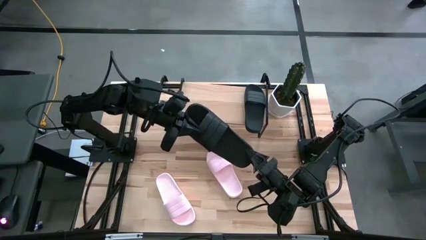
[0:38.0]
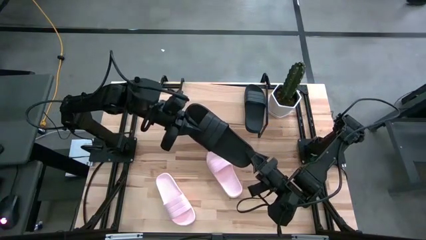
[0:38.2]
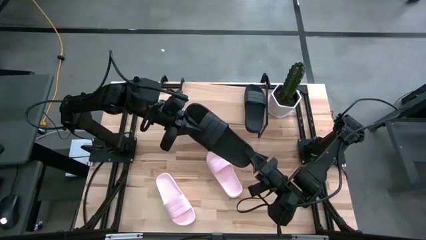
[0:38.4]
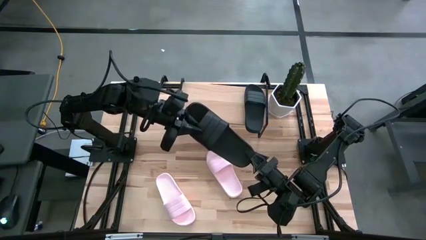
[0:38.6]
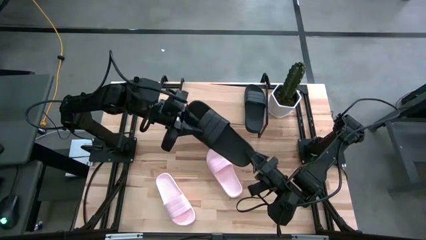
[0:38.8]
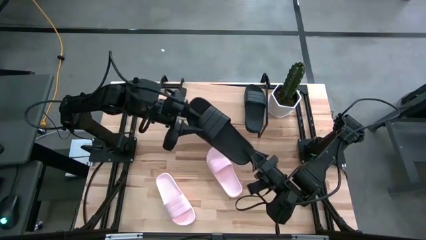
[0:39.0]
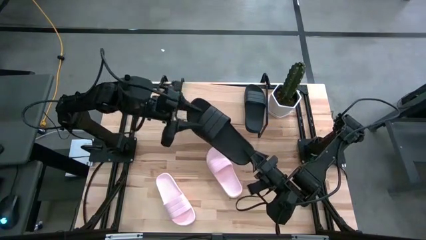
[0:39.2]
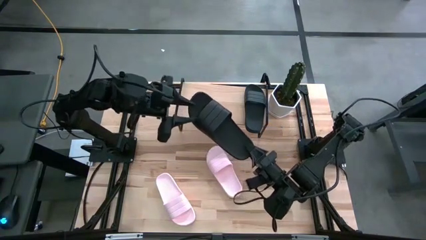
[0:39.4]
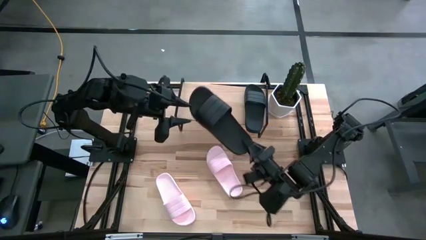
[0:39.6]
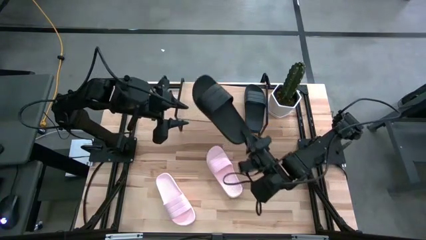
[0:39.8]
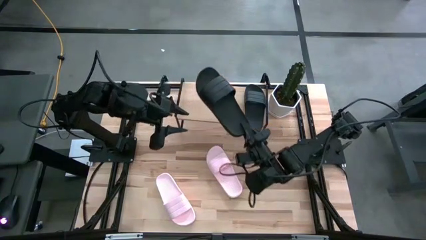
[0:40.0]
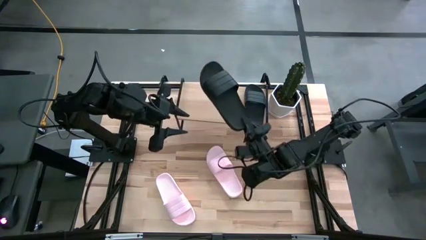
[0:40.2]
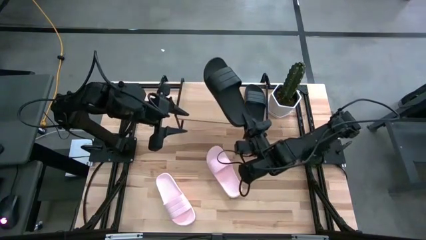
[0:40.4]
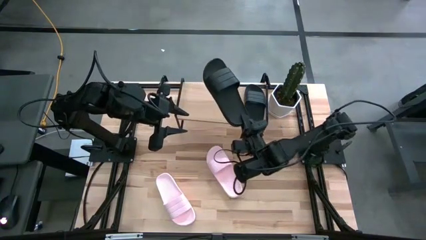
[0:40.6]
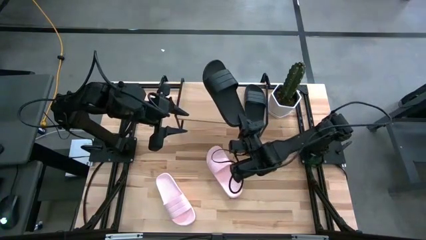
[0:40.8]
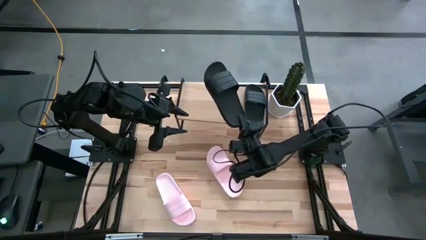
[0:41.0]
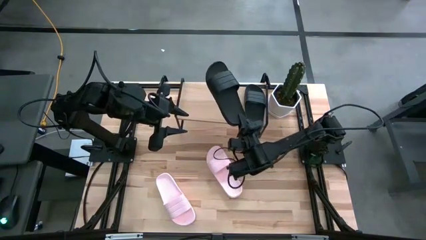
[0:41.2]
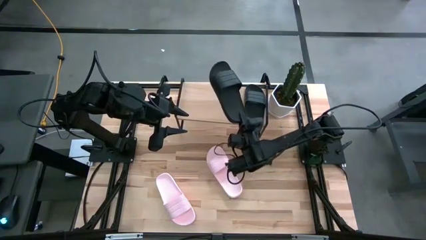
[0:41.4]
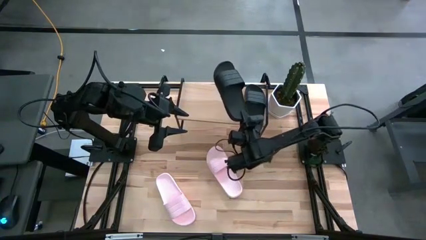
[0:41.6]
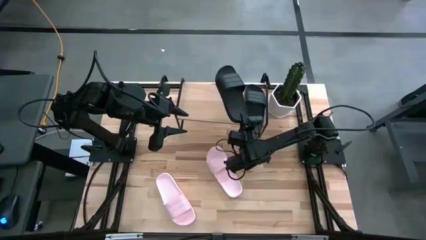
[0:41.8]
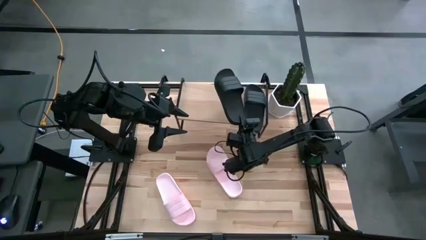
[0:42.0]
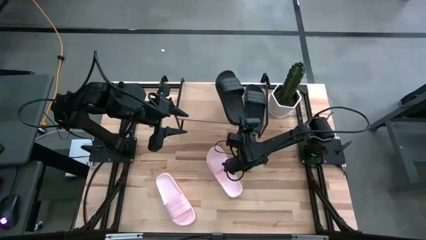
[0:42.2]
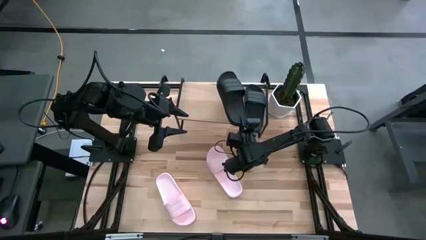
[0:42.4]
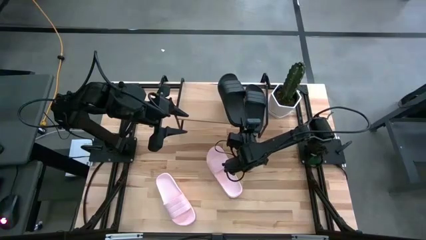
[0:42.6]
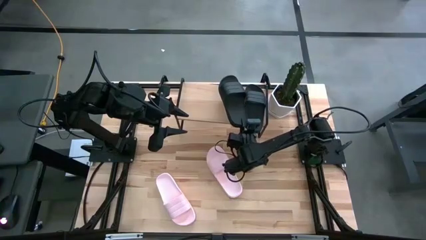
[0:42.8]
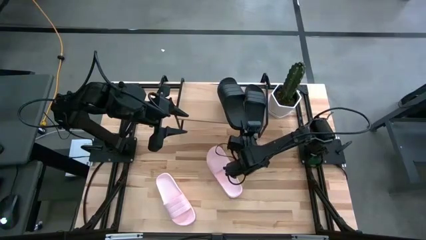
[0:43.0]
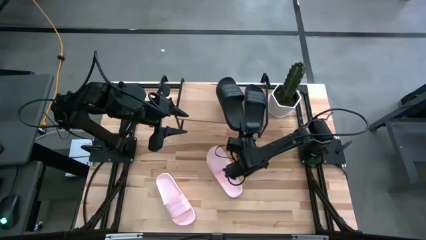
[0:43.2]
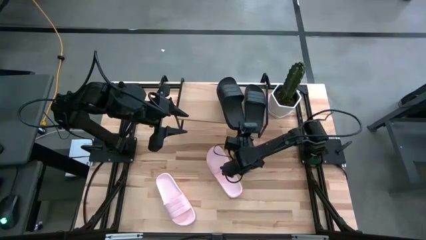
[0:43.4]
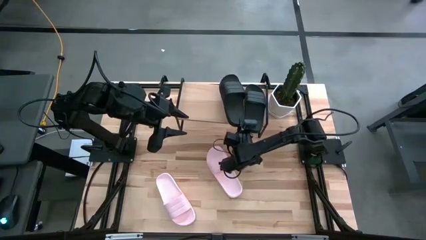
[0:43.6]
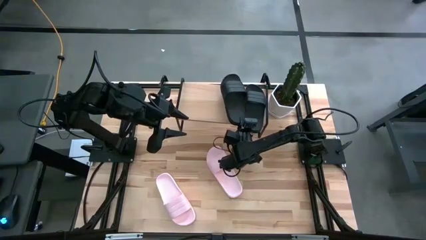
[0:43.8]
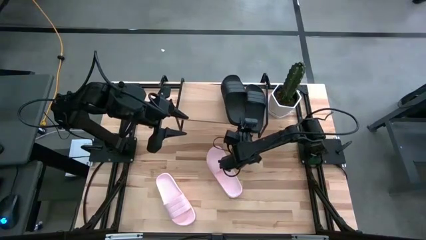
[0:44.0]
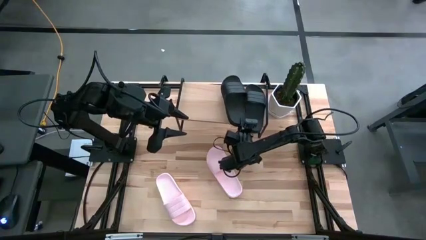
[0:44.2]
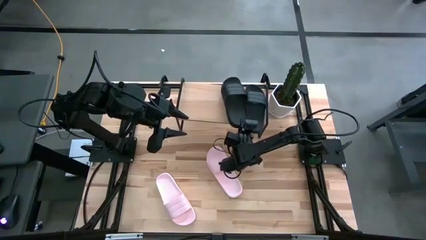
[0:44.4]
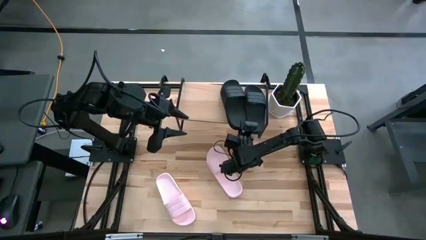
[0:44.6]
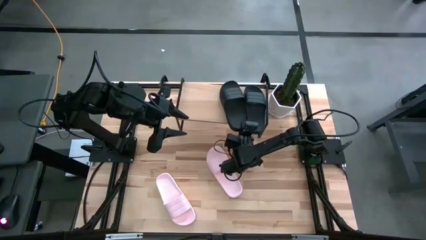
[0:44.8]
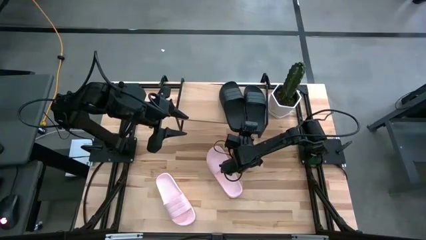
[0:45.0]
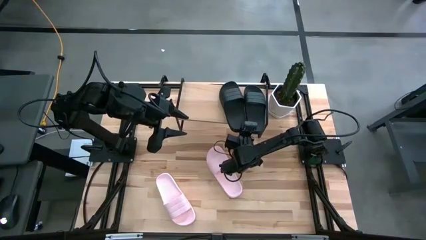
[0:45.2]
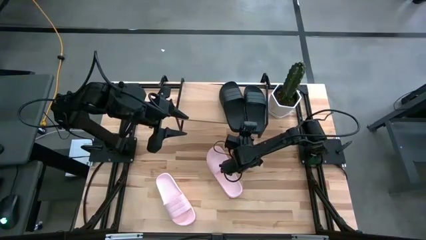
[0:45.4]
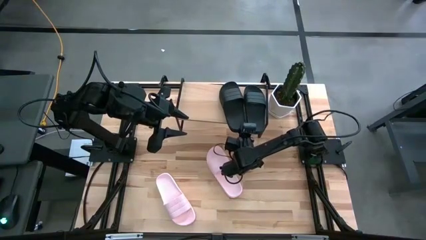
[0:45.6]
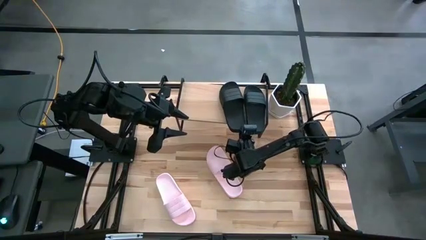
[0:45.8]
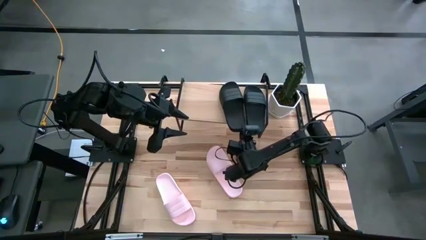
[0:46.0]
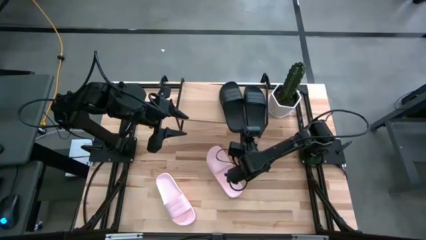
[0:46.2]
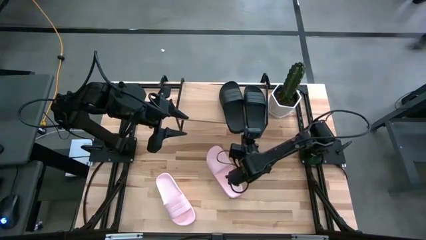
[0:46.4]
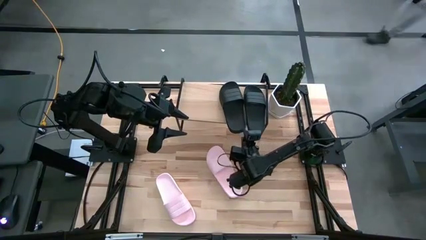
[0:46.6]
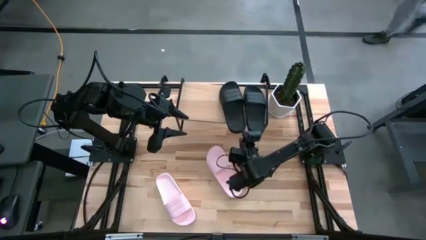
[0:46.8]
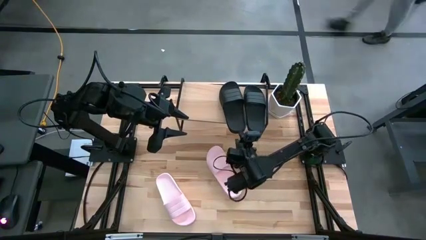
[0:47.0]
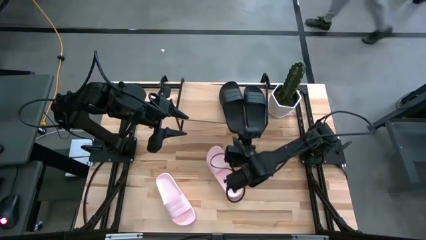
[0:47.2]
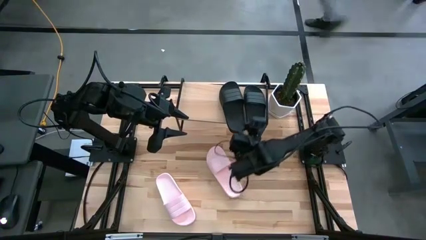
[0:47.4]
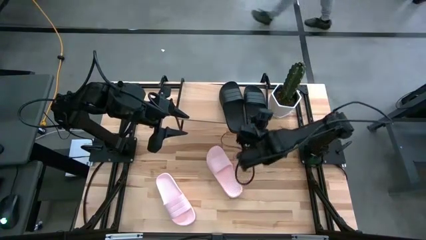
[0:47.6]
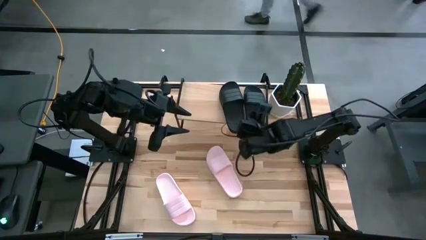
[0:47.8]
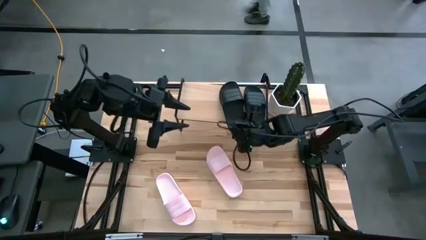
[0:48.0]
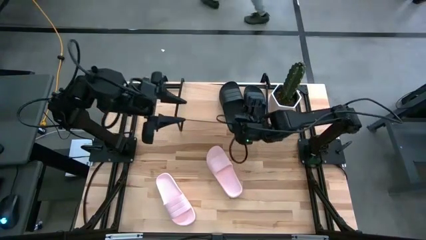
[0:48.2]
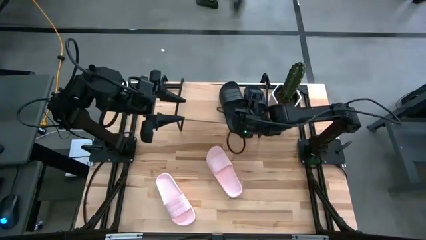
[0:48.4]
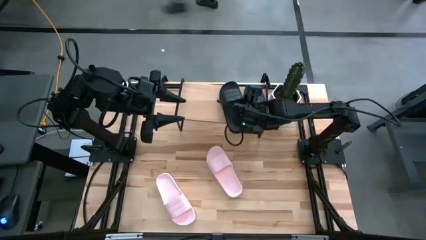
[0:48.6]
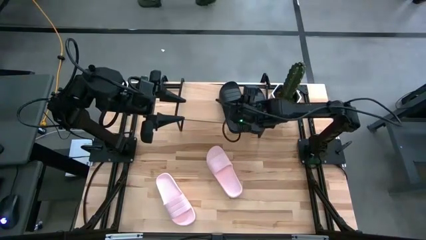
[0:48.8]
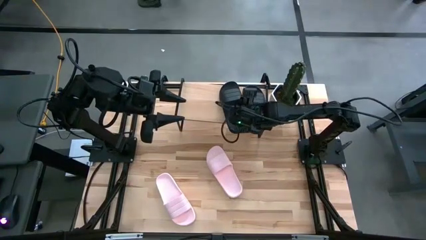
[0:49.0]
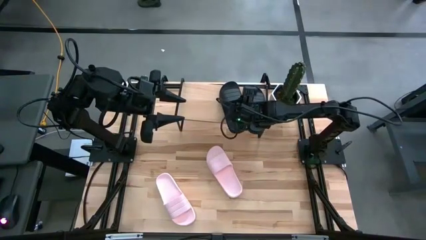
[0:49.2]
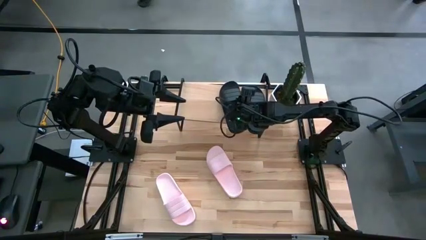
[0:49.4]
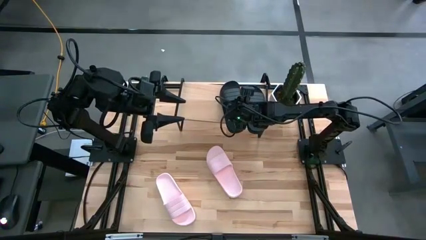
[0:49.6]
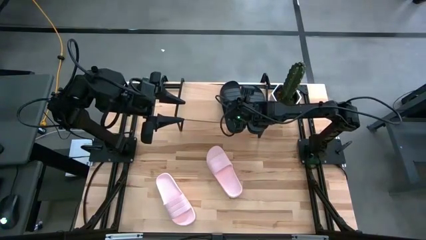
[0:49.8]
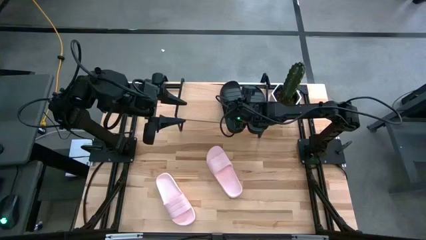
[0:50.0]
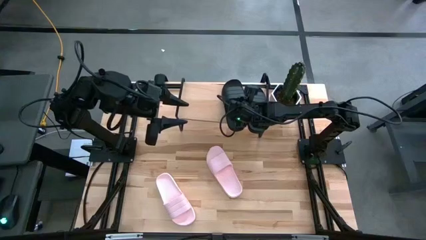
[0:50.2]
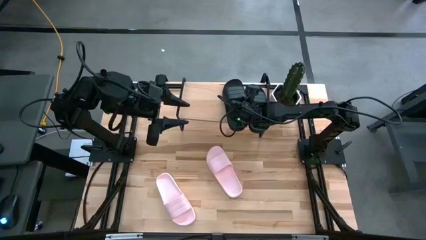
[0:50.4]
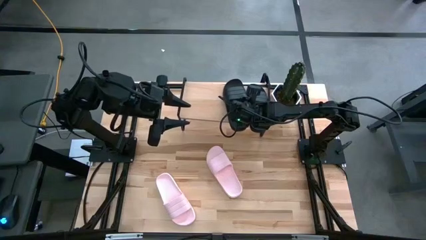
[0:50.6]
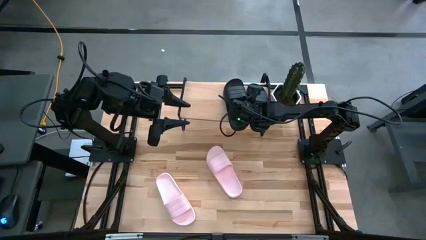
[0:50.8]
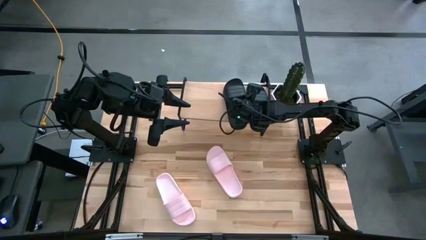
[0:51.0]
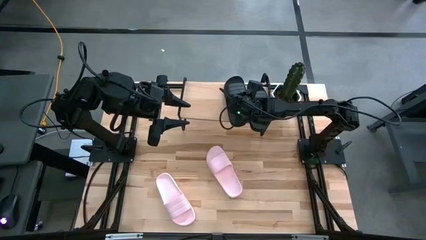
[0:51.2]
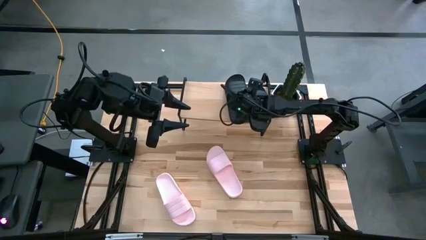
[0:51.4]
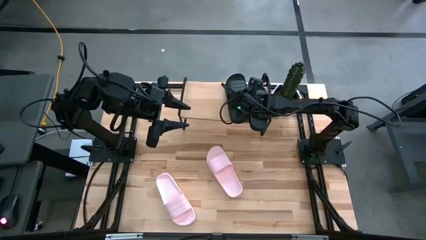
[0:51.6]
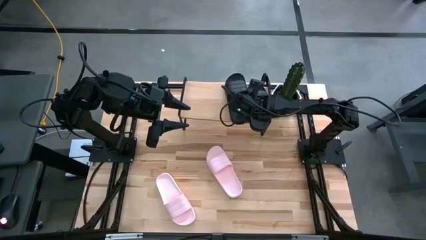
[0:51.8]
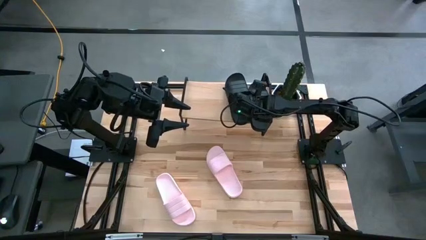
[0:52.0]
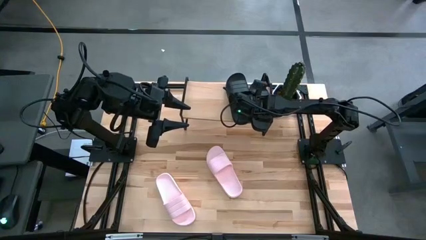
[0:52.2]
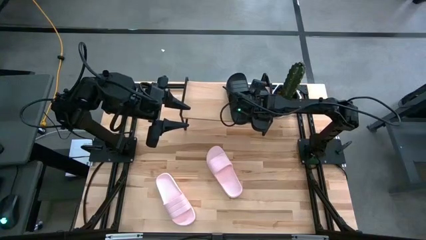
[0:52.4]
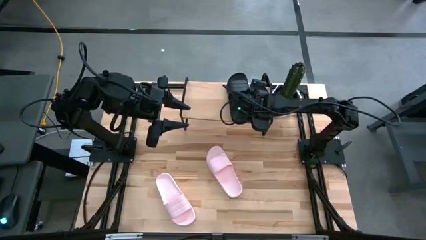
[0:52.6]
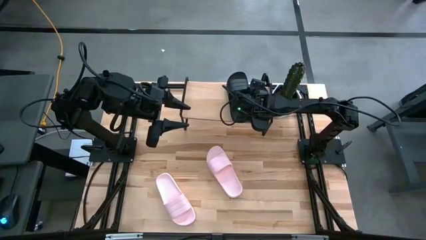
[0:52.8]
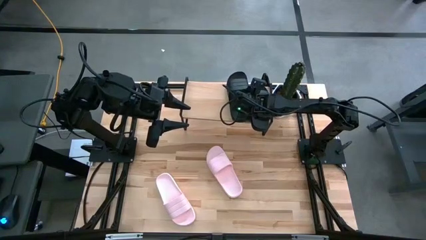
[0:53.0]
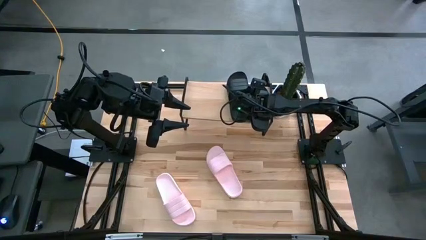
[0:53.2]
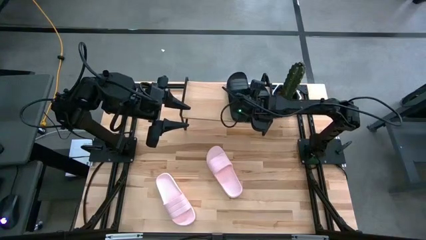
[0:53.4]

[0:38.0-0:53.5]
Task: Pick and place slides into the shelf
Put the black slide on the shelf

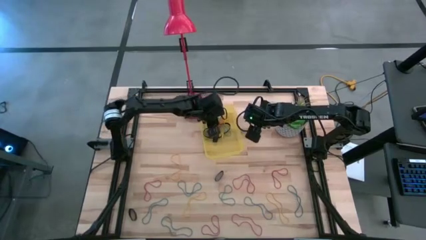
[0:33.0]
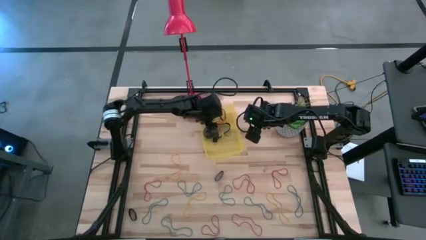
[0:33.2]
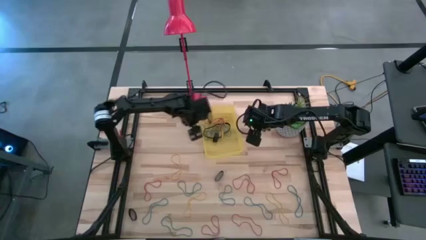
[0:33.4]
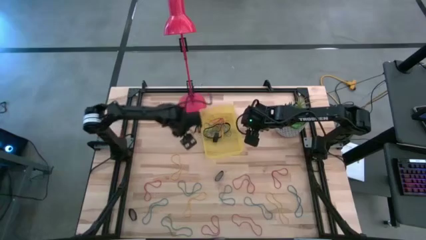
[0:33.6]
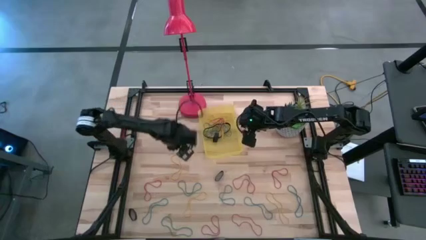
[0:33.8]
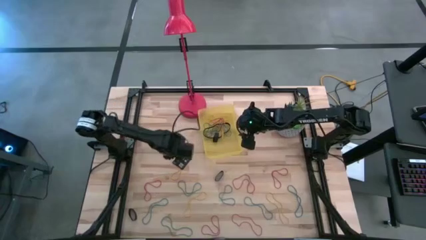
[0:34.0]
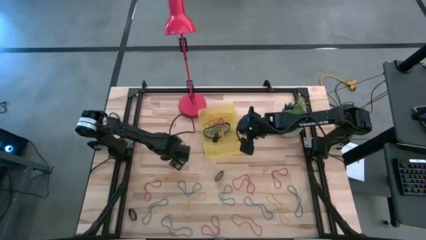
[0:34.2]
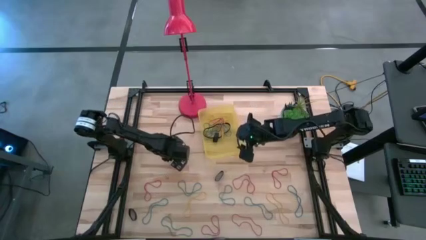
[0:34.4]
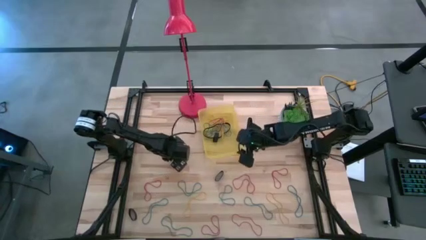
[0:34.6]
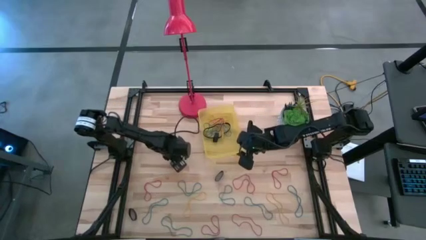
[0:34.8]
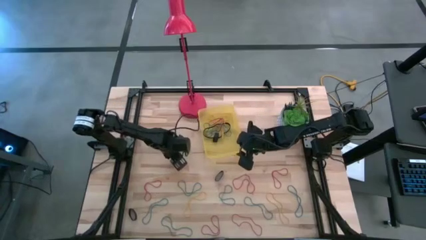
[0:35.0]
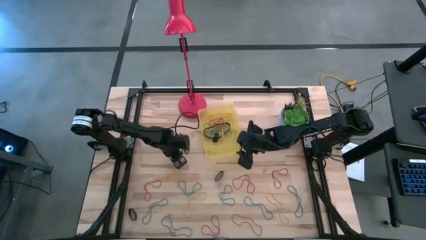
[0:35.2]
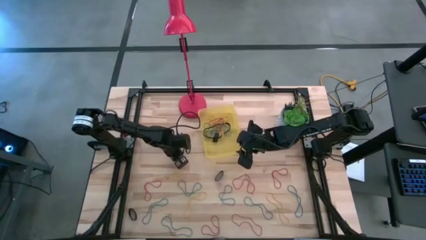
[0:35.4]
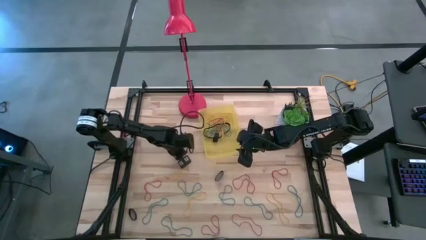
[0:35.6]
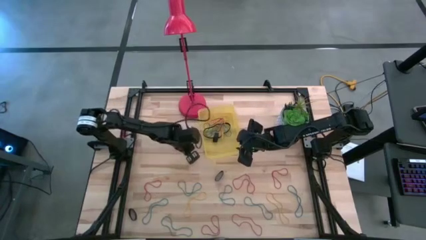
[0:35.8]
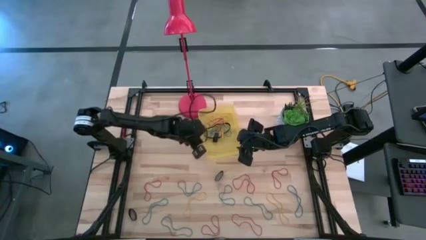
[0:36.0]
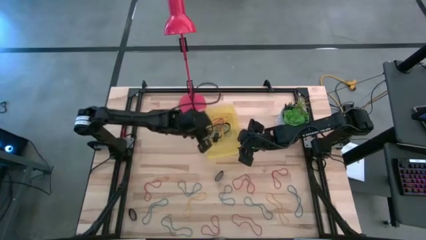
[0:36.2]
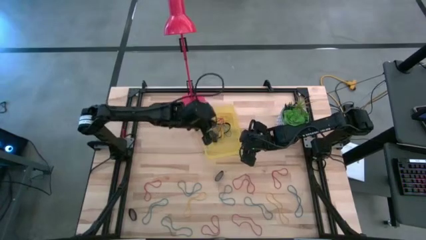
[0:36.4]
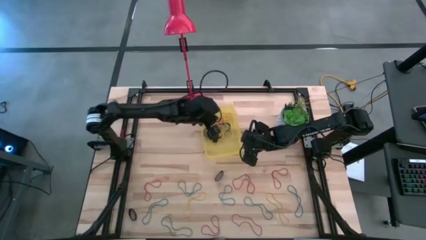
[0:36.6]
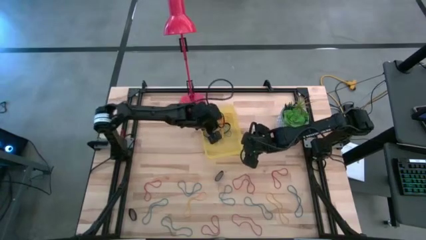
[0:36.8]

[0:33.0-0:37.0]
Task: Pick and place rubber bands into bin
Put the yellow rubber band into the yellow bin
